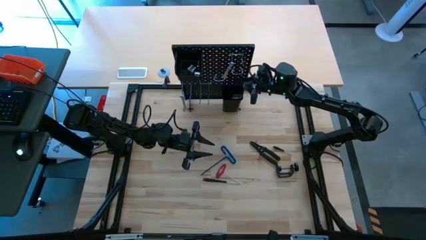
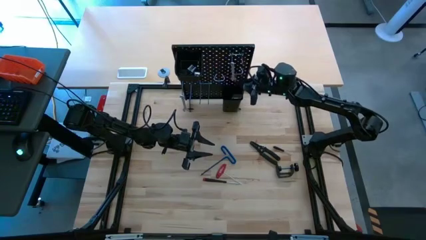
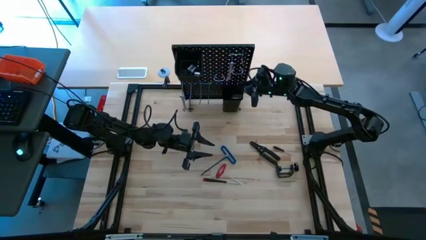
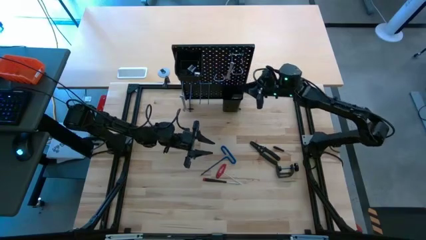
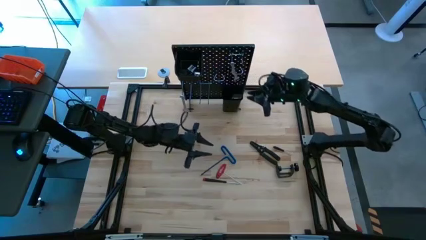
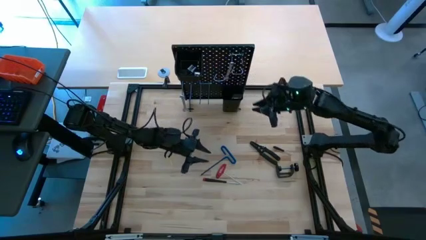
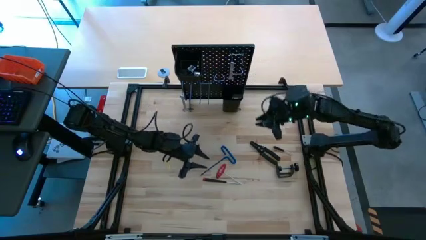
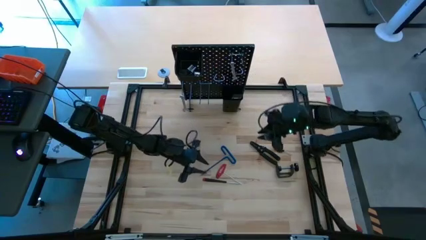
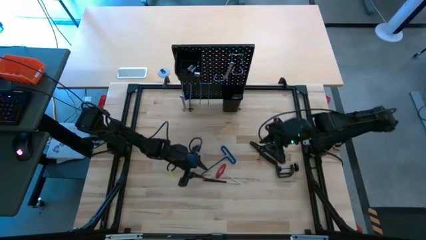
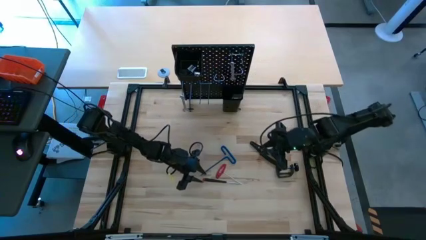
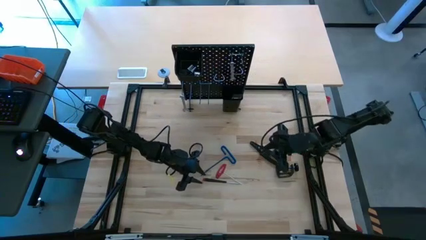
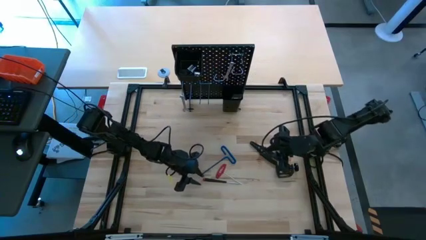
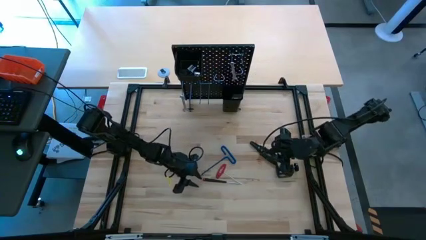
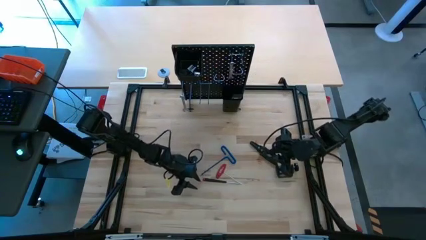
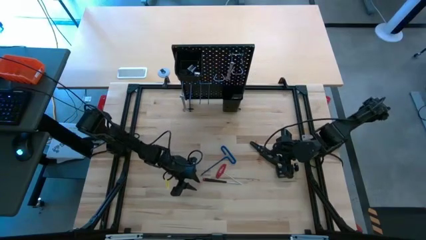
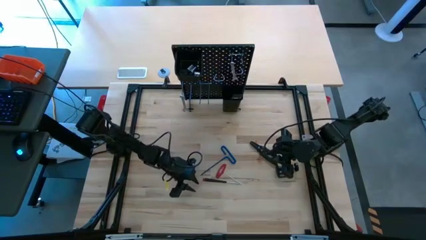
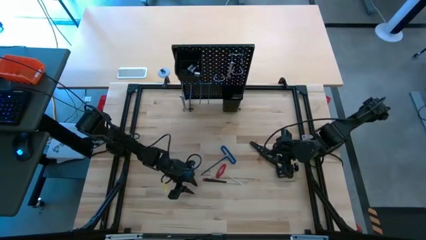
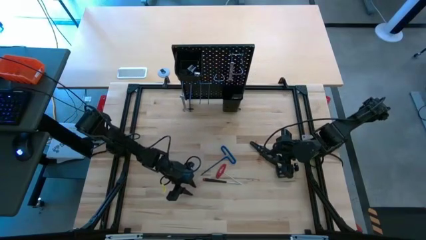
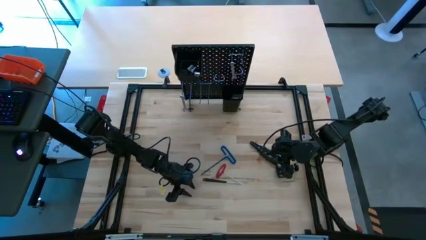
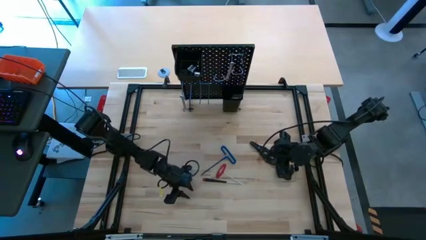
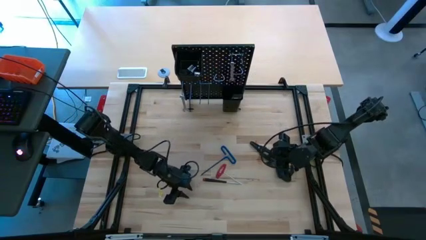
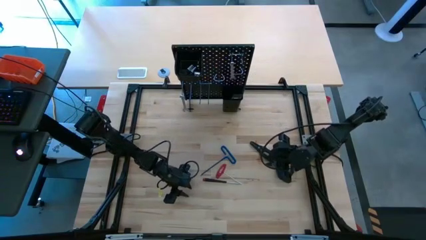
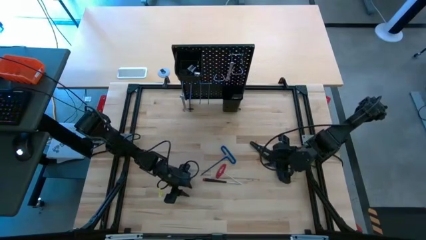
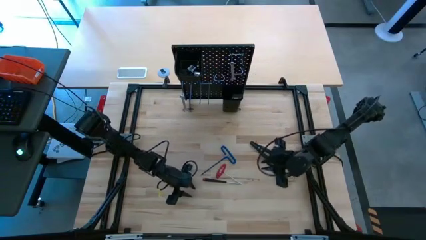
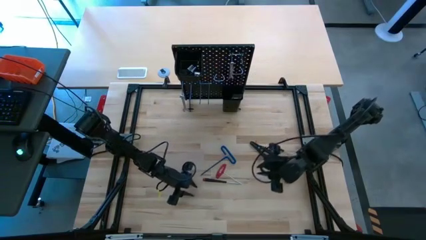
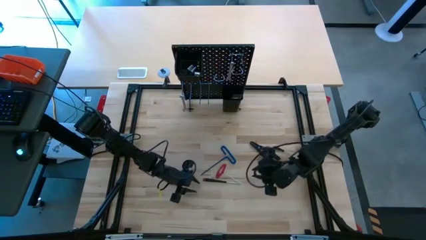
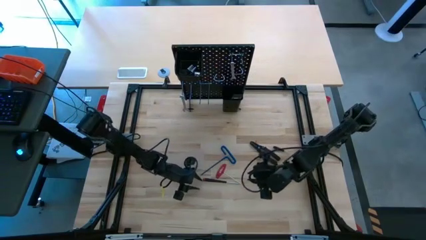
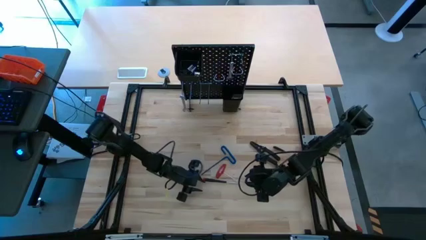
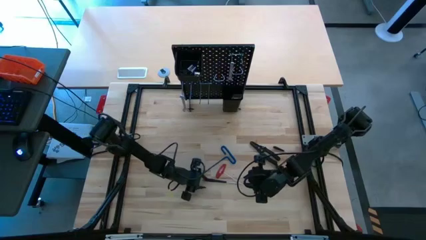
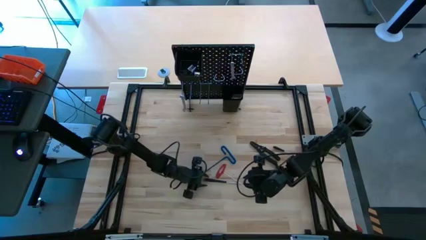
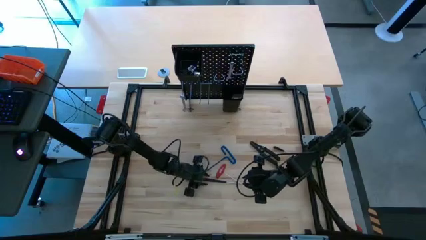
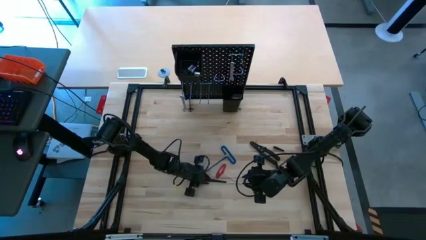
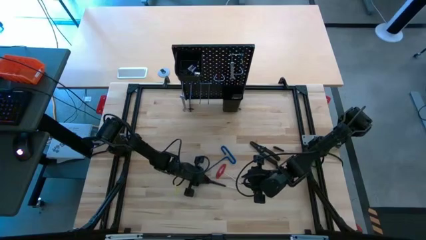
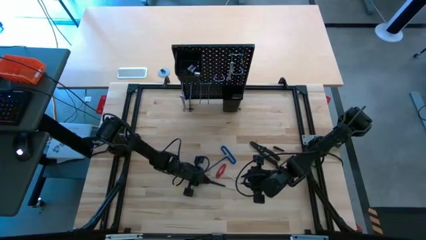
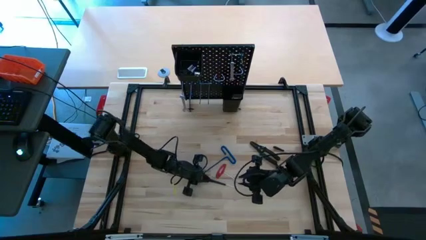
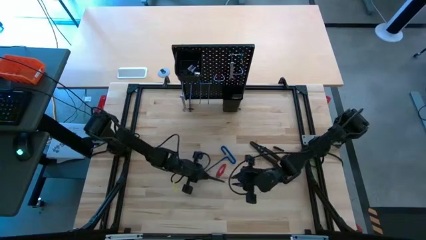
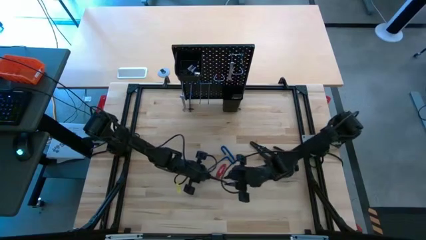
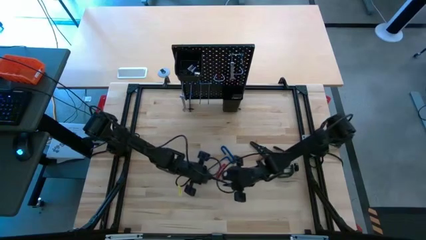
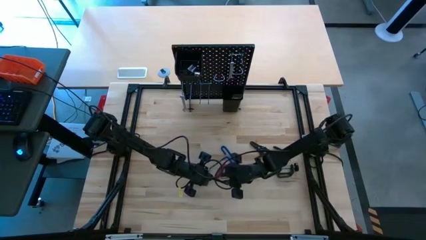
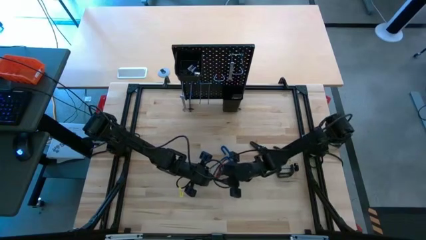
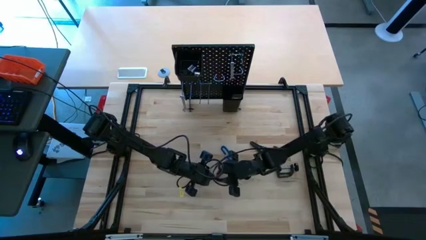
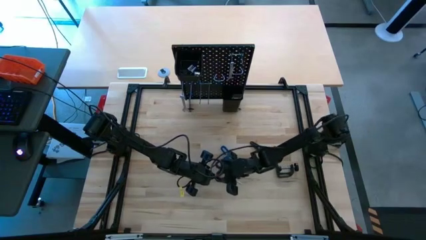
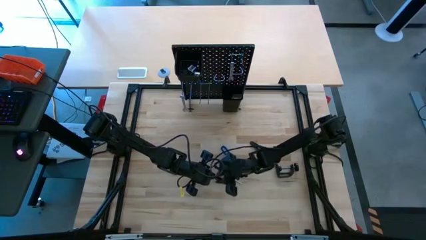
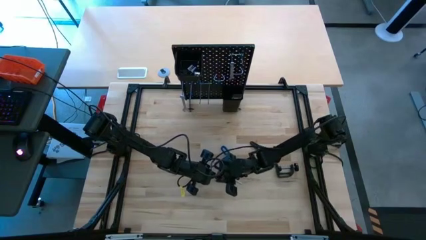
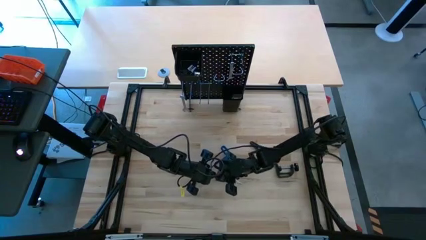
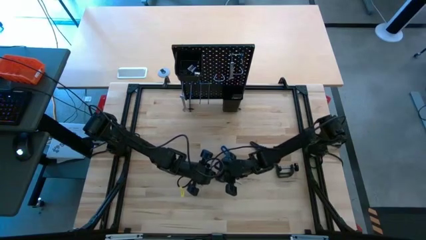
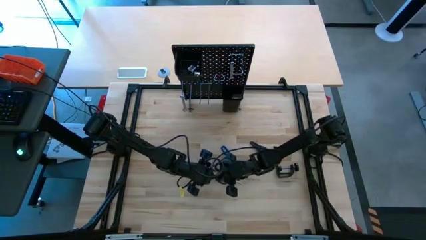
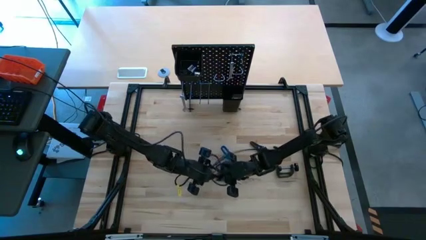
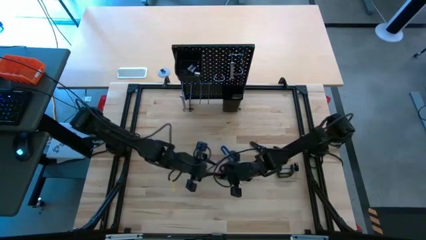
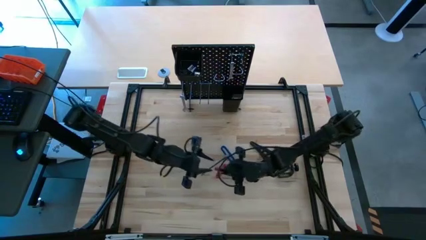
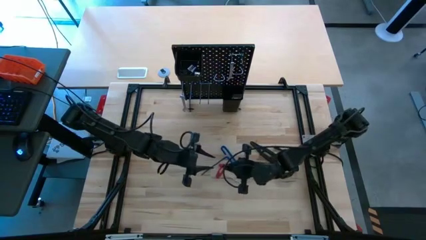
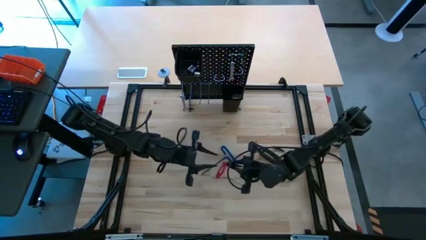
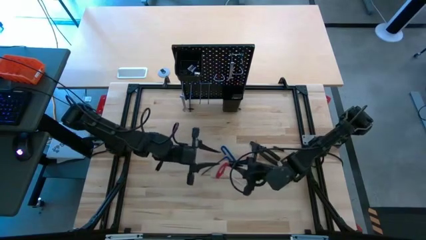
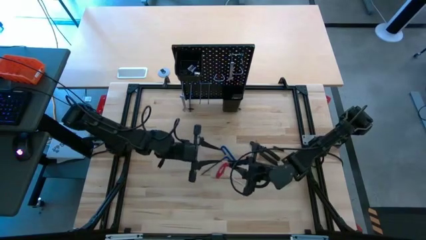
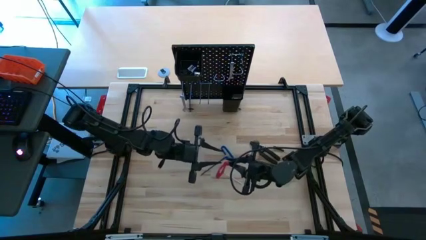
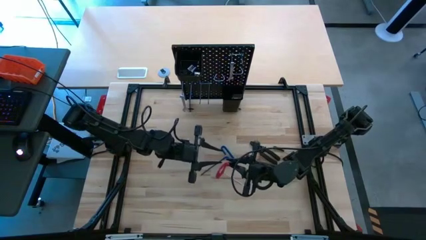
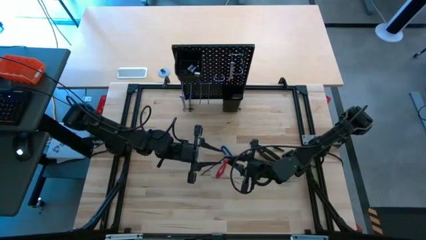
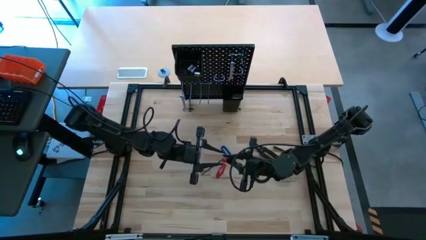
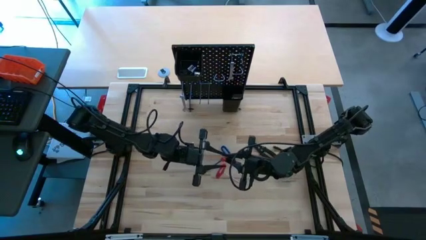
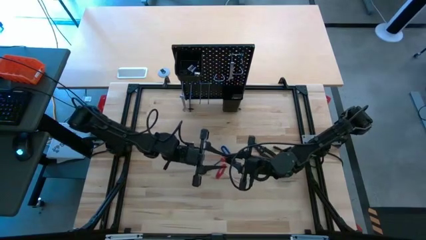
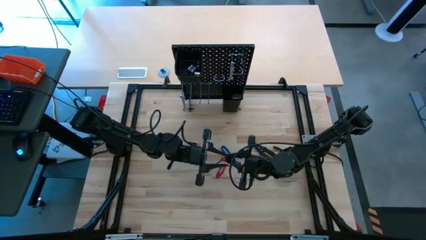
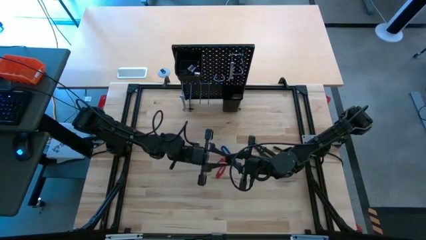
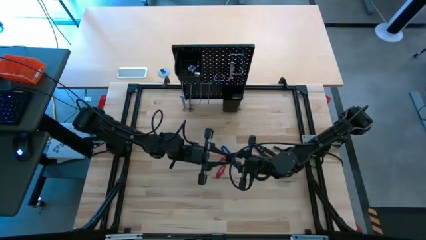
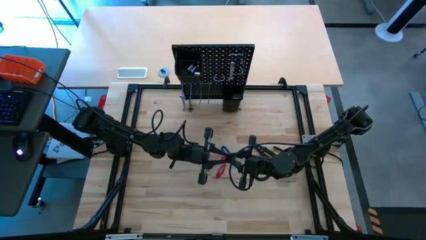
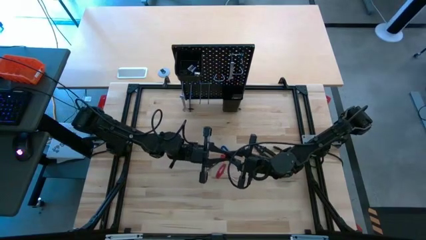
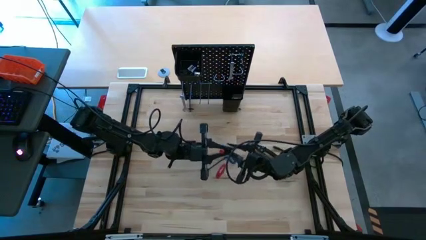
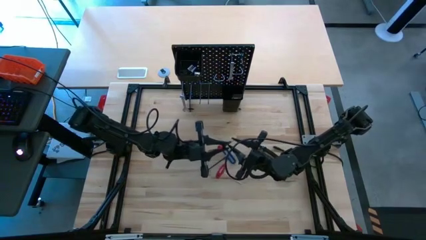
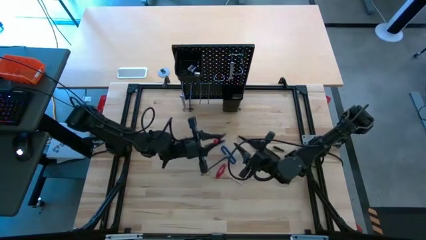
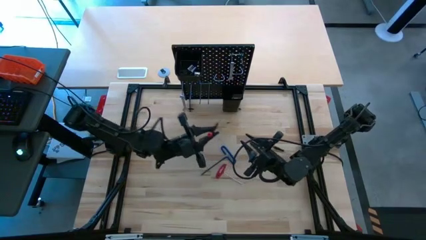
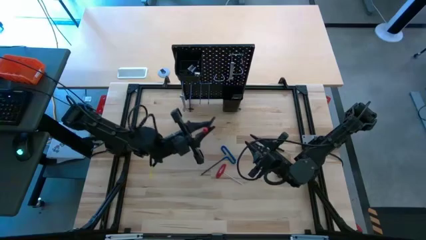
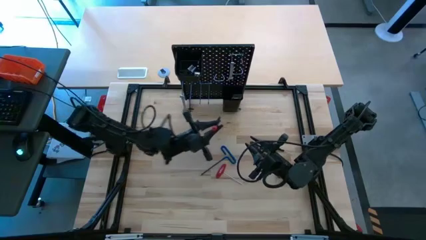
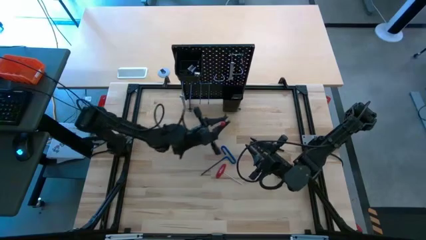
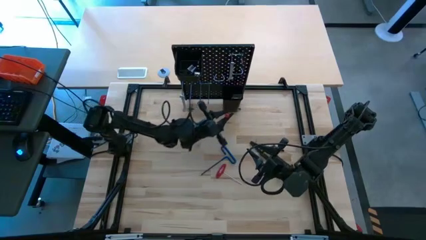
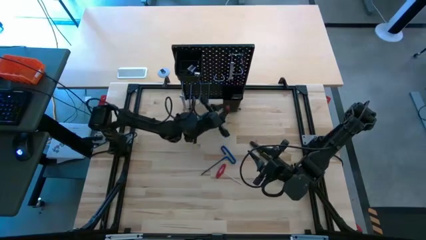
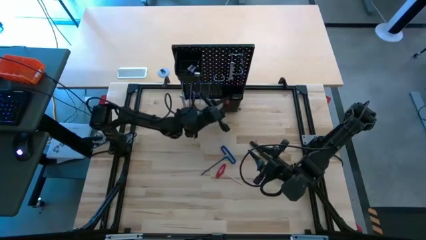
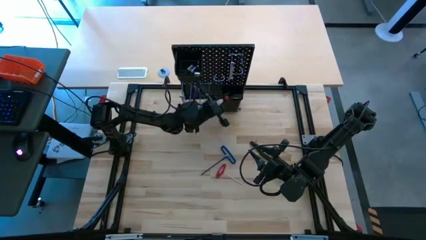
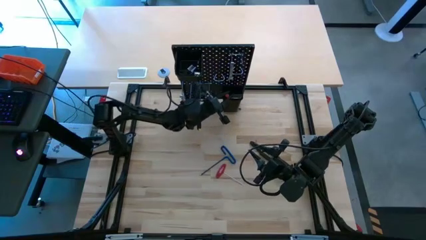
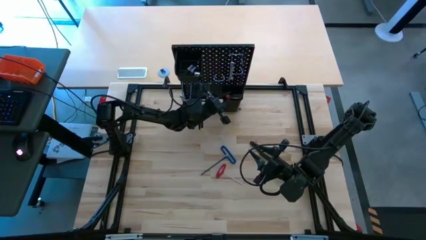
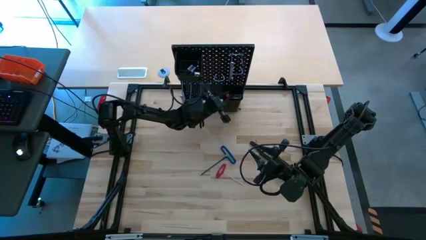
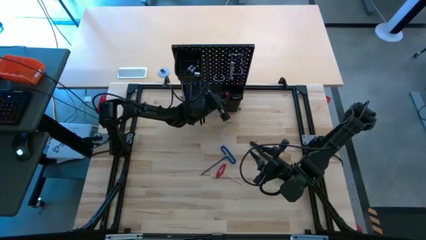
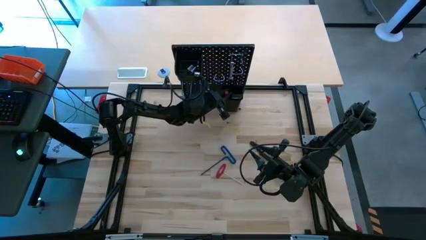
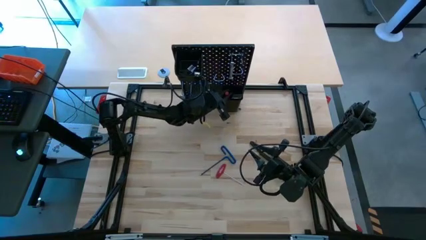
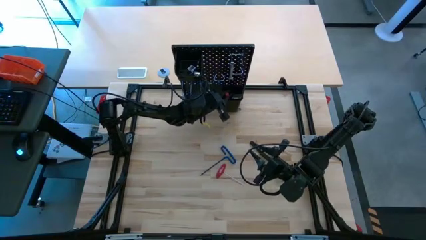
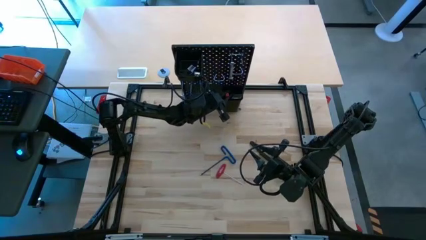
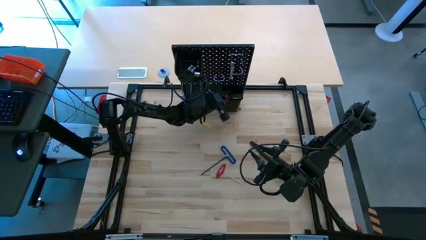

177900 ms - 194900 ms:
Task: Hang tools onto peg board
Put the nut driver into the bottom black bin on the pegboard
